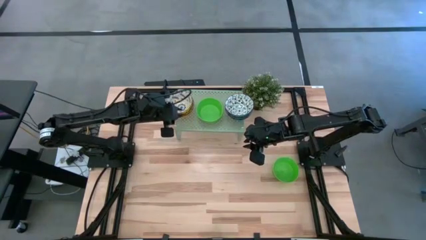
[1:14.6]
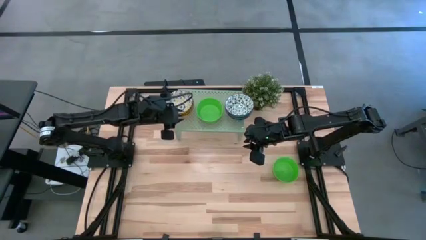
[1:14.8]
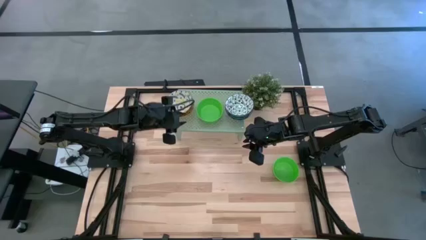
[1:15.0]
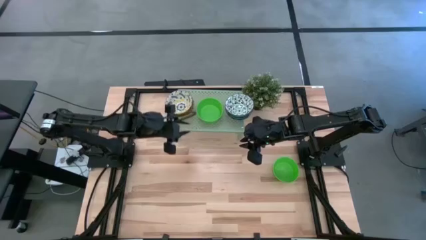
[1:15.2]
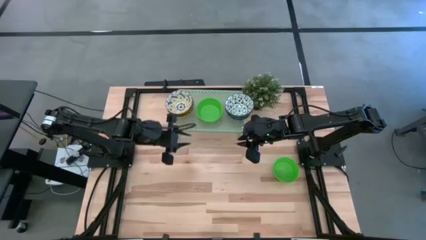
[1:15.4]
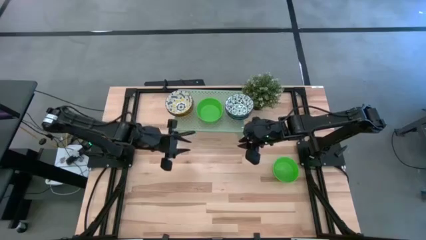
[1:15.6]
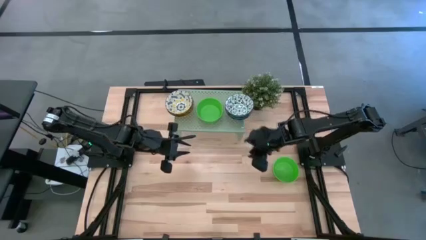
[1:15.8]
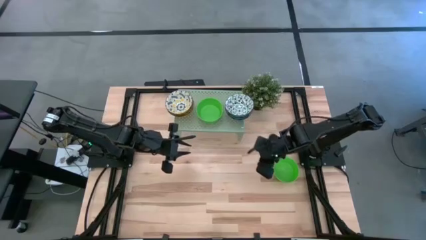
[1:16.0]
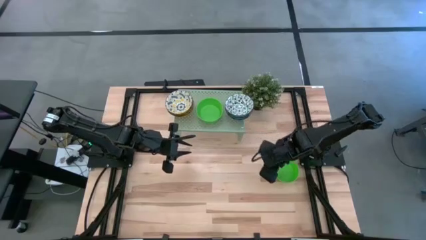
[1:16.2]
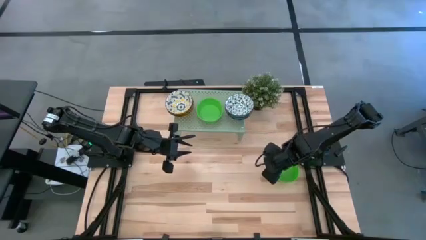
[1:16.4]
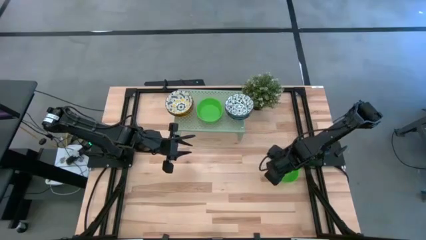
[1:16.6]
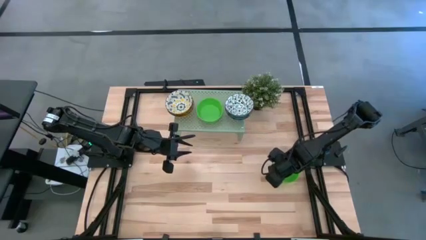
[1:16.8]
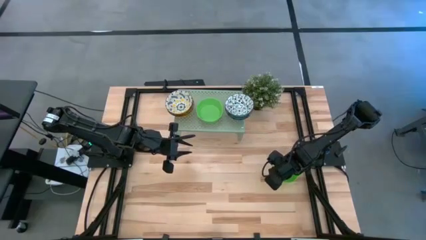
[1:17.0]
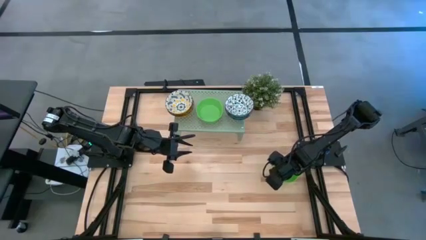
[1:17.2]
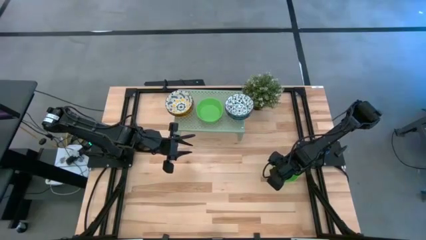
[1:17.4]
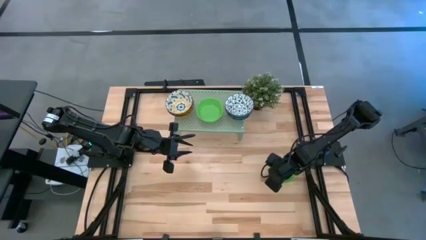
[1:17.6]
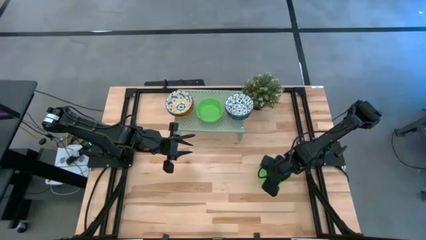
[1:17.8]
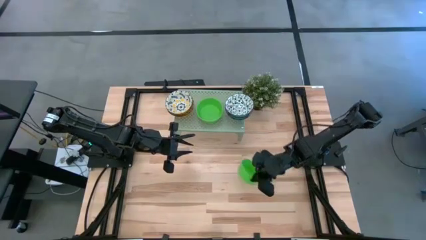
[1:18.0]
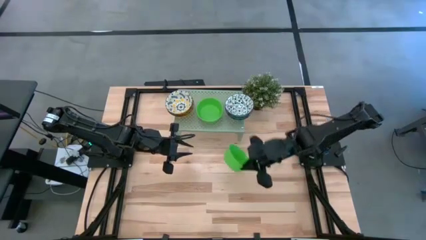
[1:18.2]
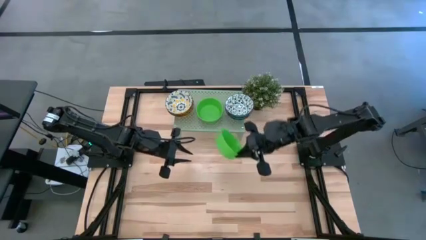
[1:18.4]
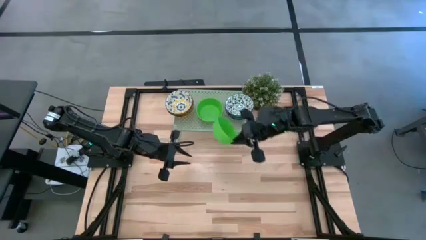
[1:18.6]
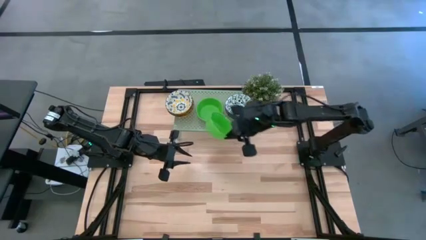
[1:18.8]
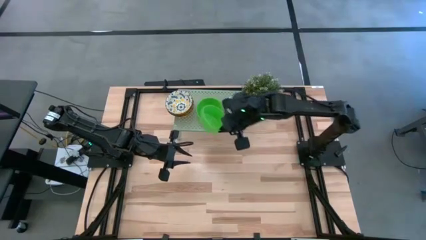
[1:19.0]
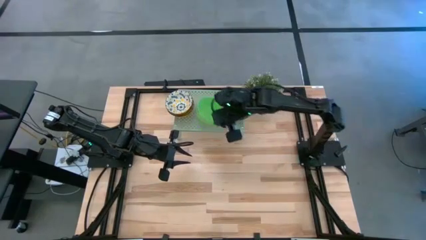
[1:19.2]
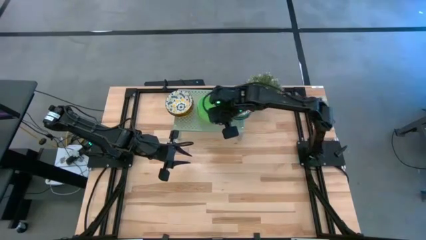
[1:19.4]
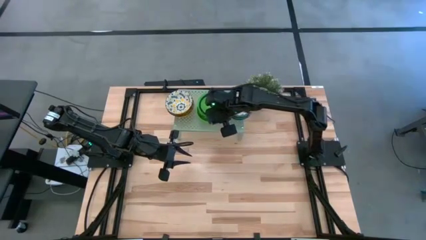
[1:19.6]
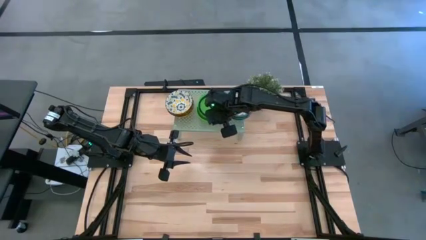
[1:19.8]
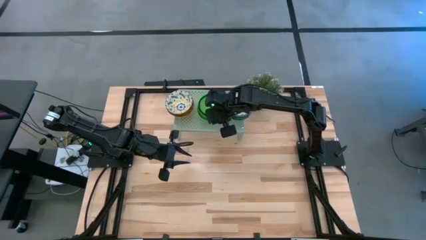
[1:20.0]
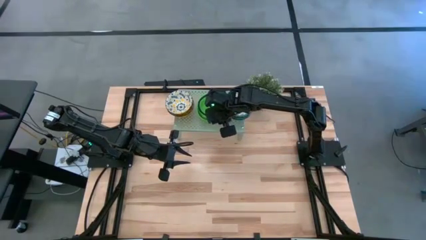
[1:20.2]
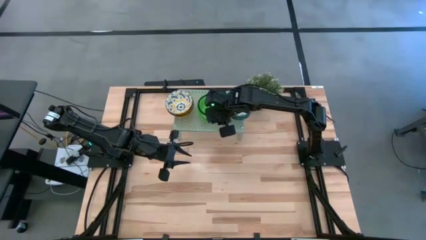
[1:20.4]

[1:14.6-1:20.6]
Task: Pick & Place Mini bowls
Stack the green bowl on top of the green bowl on the shelf

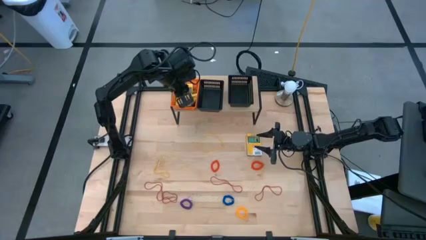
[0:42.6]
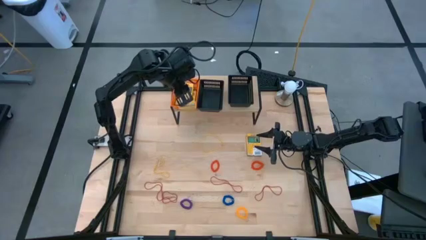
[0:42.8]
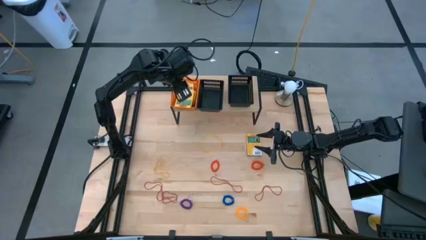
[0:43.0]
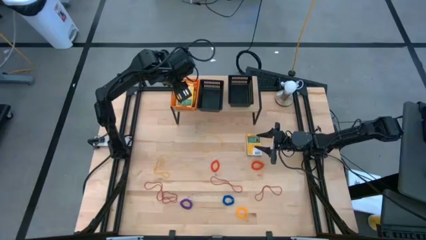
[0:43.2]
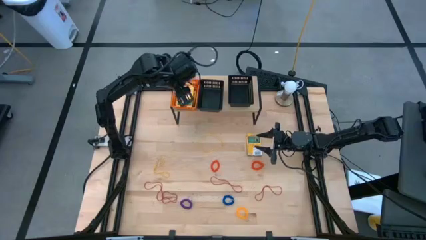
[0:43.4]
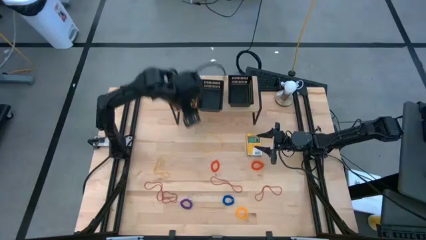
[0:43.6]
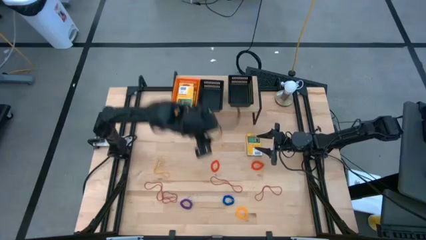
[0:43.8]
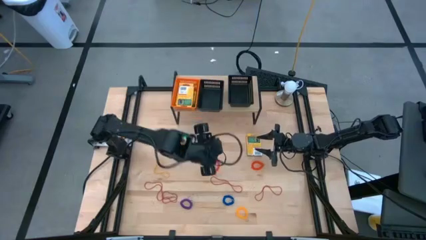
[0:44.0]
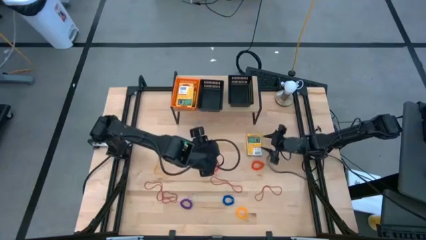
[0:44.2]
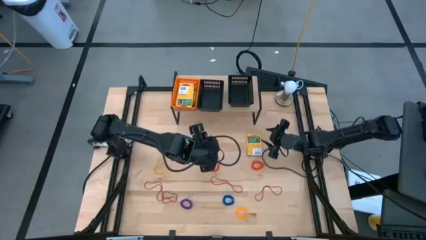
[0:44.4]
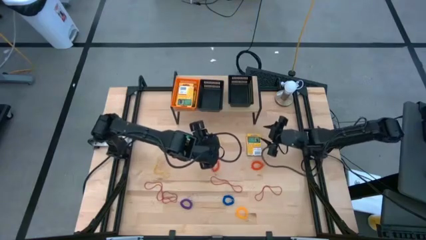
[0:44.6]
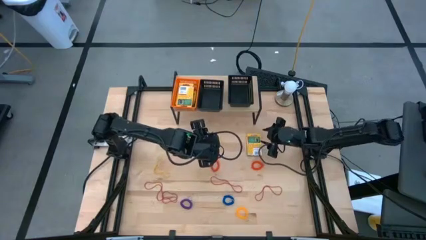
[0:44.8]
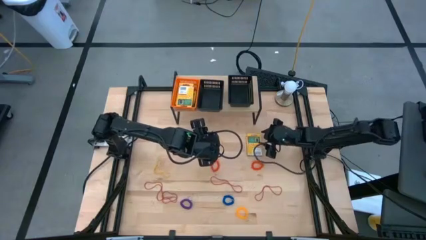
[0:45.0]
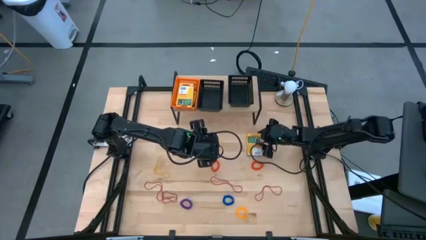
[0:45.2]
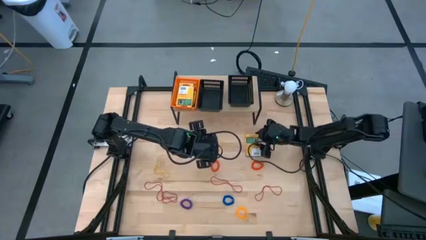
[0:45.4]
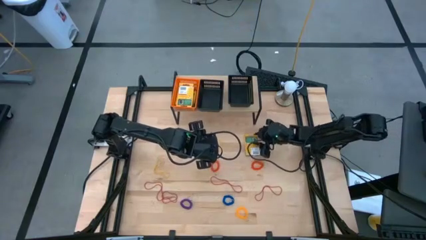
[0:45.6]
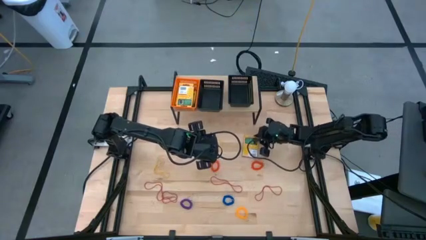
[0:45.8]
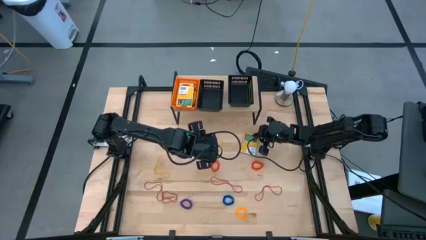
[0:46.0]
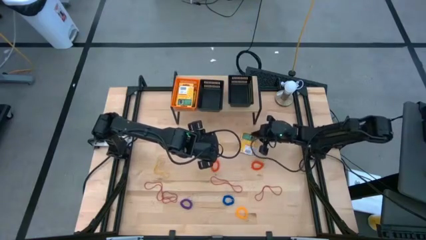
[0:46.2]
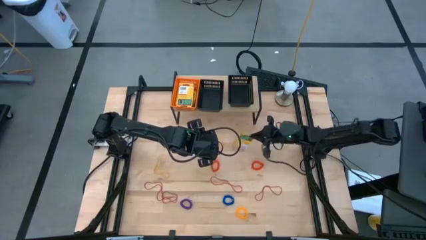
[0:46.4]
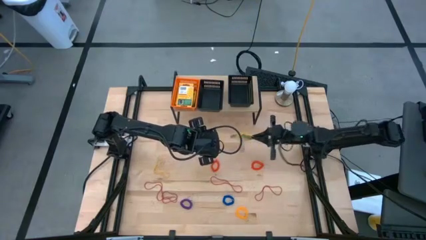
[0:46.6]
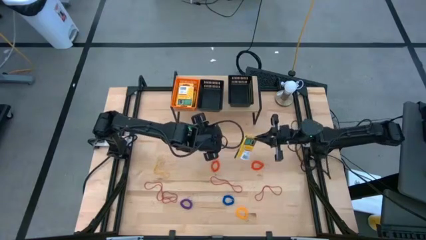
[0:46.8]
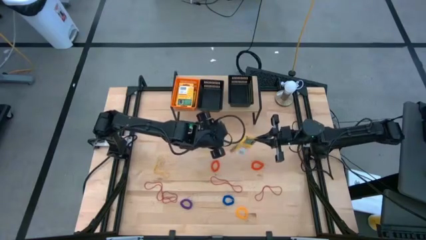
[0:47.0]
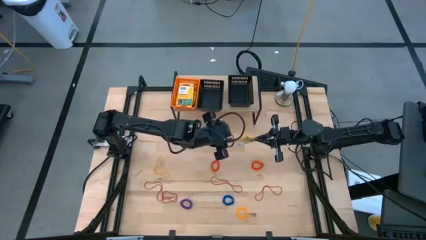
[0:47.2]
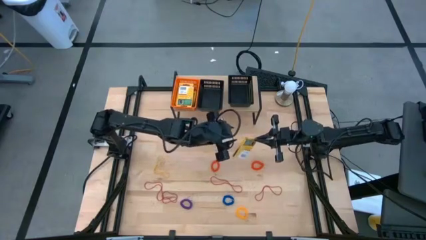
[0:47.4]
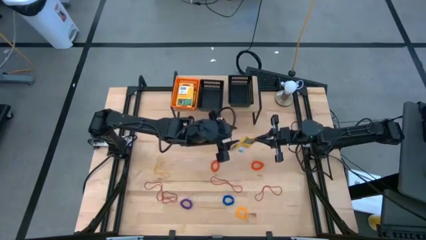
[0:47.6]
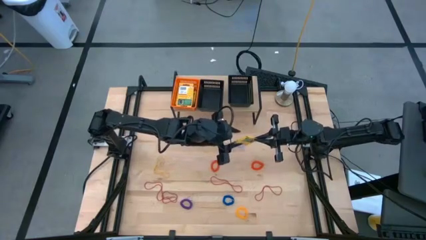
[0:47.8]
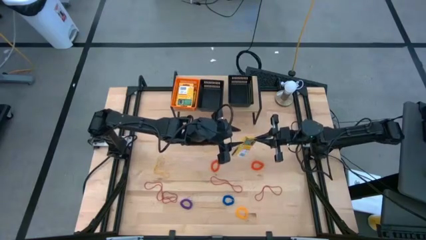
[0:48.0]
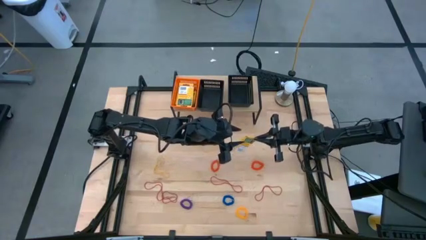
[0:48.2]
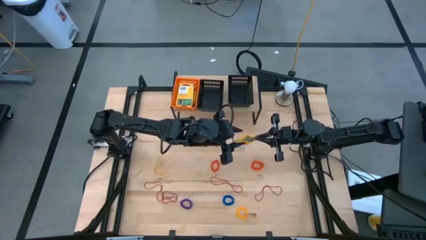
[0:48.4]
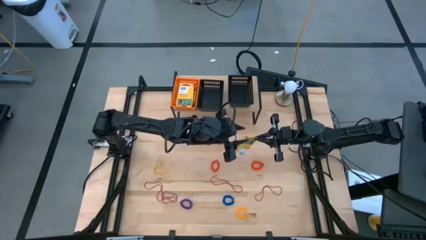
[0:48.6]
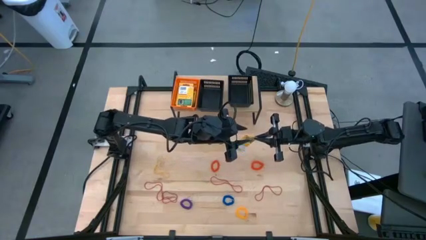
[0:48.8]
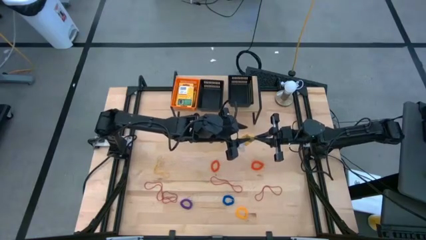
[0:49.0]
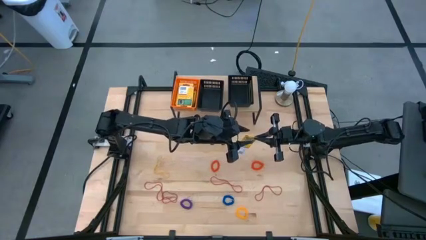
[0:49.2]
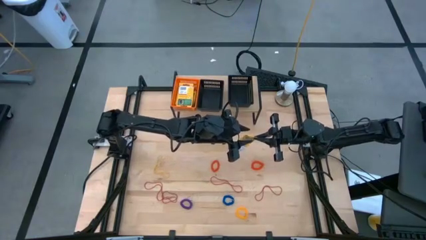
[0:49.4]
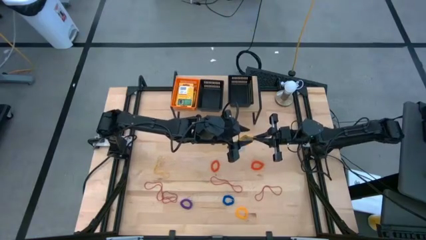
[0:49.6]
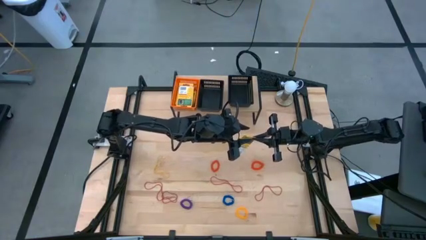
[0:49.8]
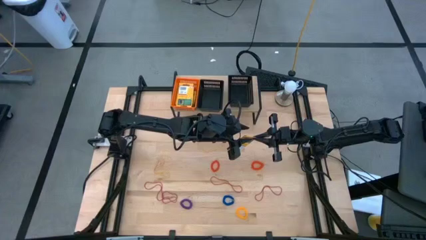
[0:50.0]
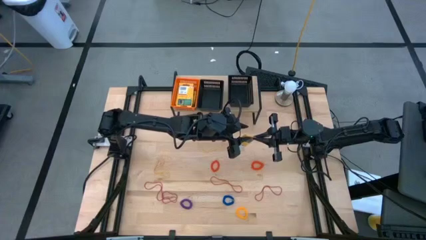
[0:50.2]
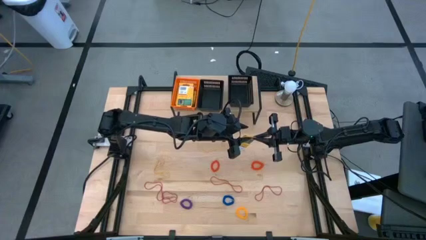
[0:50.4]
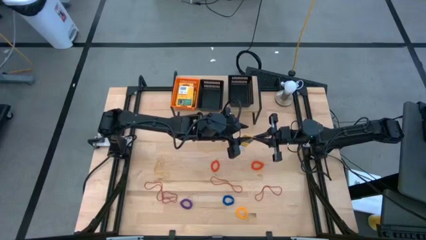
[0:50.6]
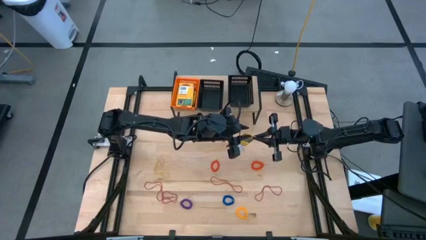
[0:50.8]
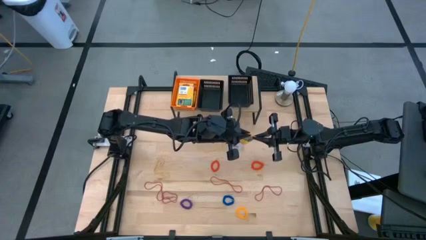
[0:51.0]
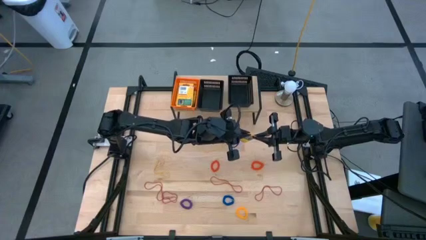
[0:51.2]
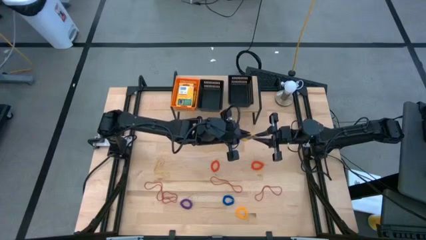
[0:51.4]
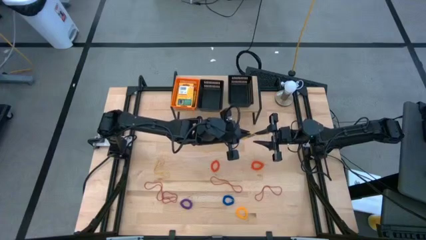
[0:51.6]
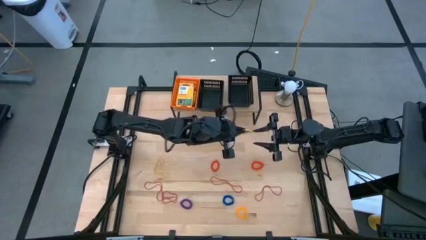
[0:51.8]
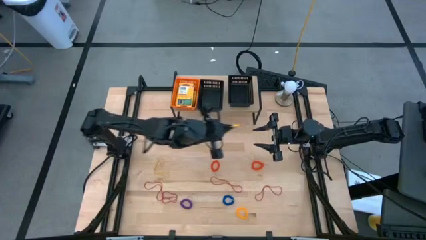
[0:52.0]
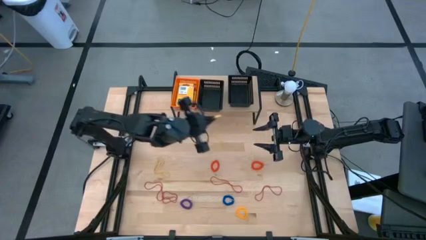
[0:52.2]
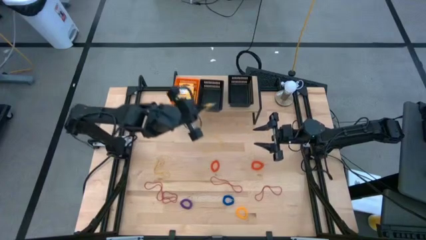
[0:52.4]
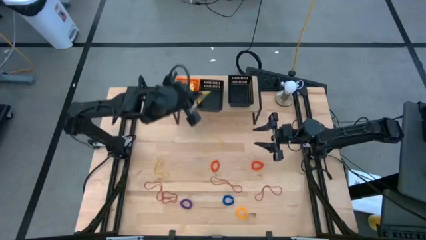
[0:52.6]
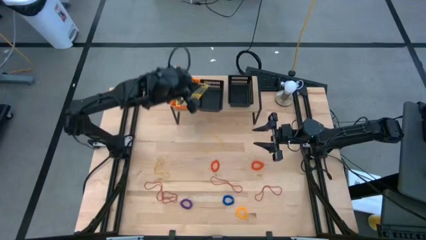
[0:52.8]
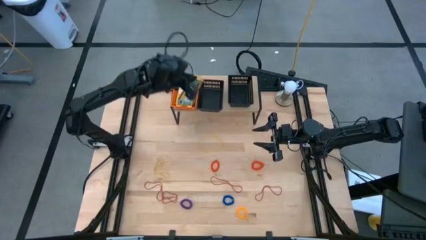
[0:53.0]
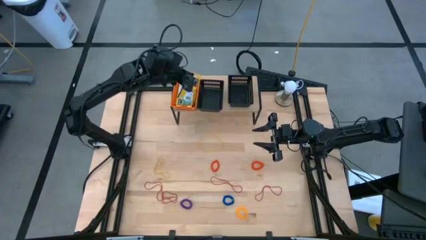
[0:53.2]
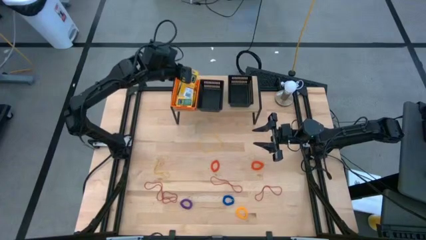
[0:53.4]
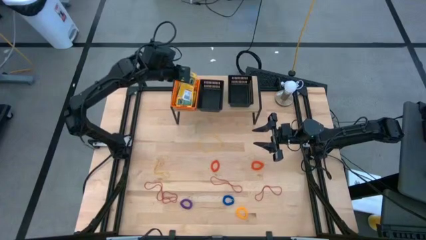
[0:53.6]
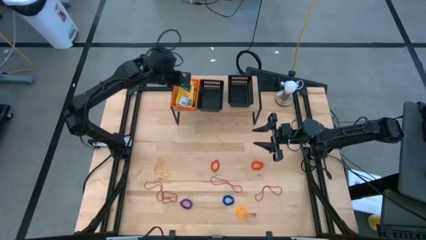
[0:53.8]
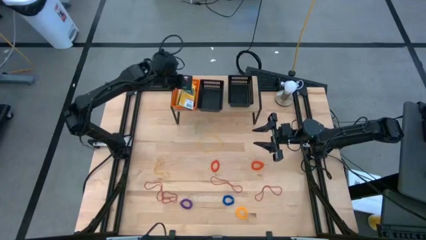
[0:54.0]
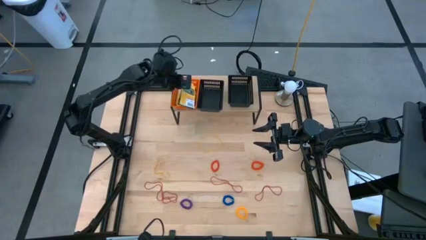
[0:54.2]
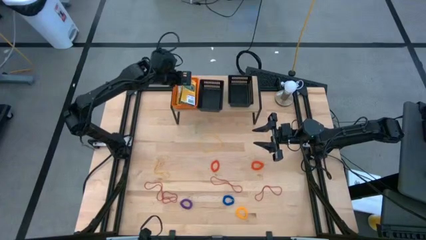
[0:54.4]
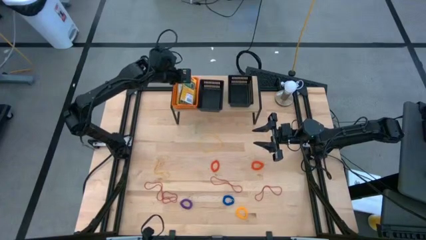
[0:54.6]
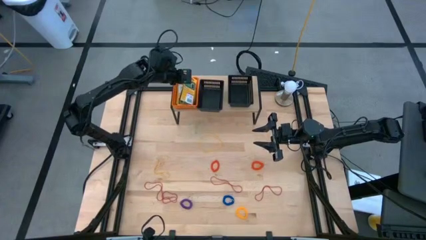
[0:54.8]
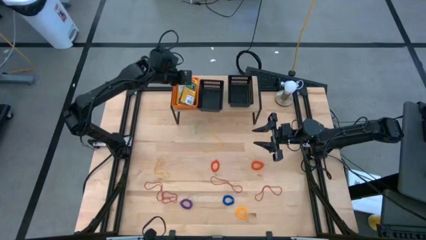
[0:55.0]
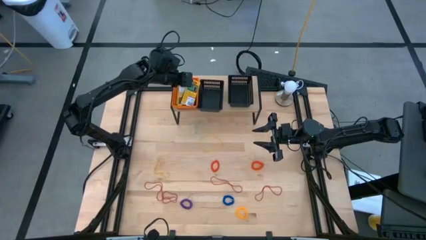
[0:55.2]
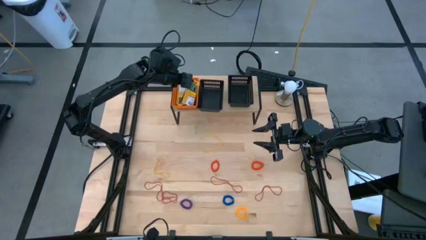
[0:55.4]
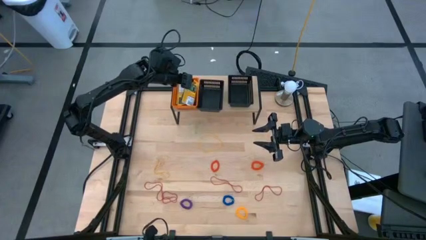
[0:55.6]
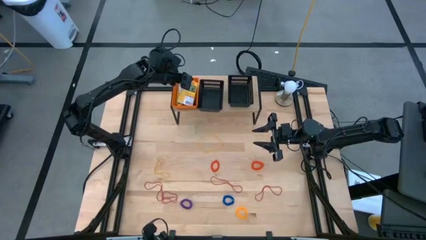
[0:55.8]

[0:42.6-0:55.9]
Task: Pick & Place Office Desk Supplies
Put the yellow pack of crayons into the orange bin on the shelf
